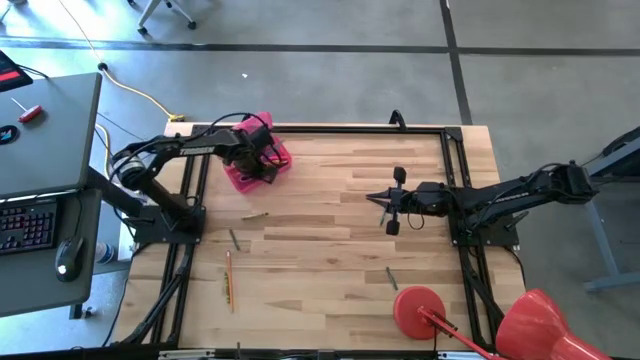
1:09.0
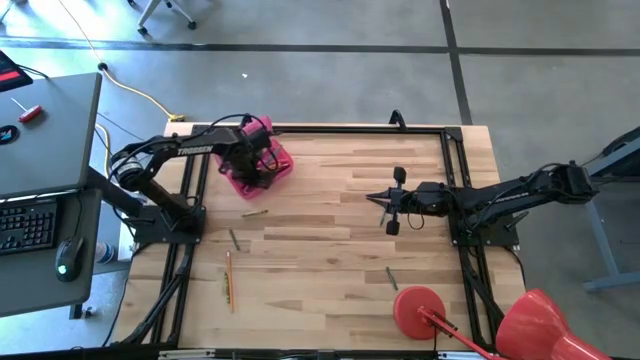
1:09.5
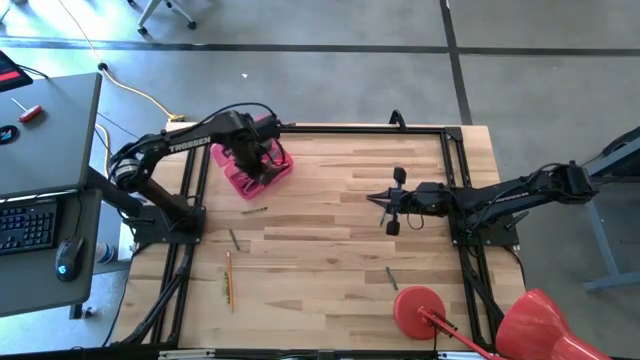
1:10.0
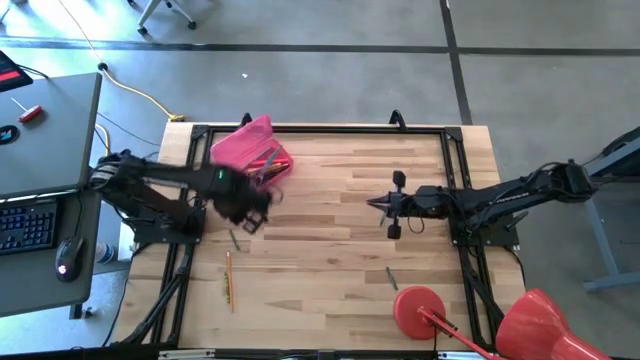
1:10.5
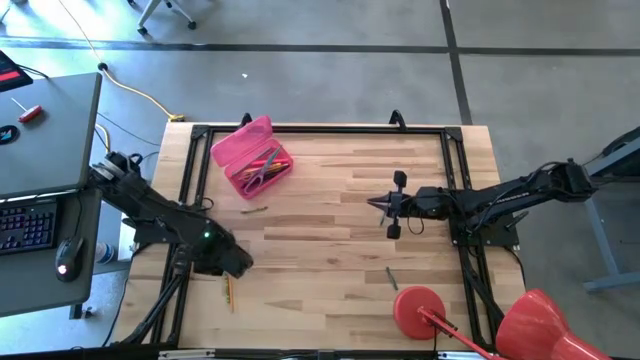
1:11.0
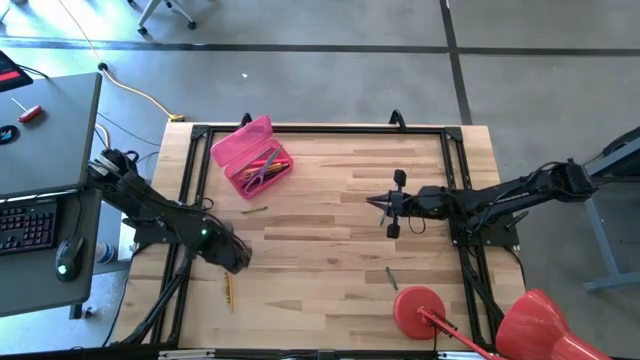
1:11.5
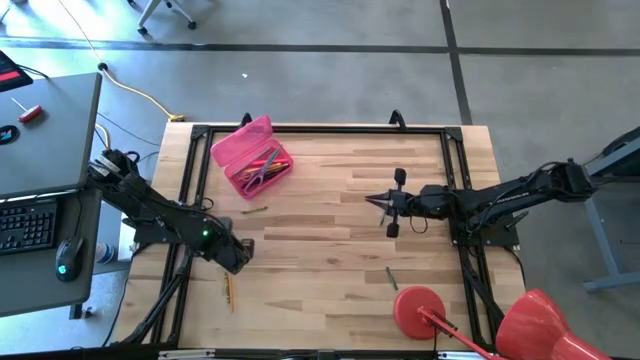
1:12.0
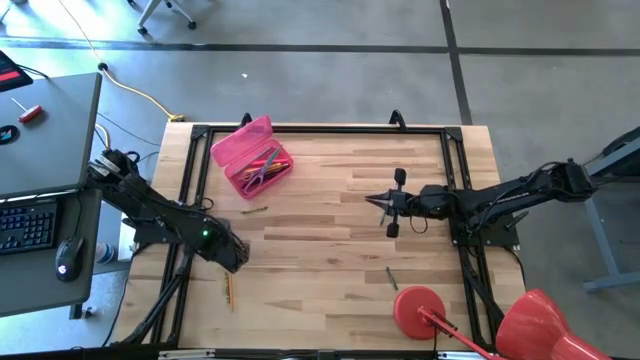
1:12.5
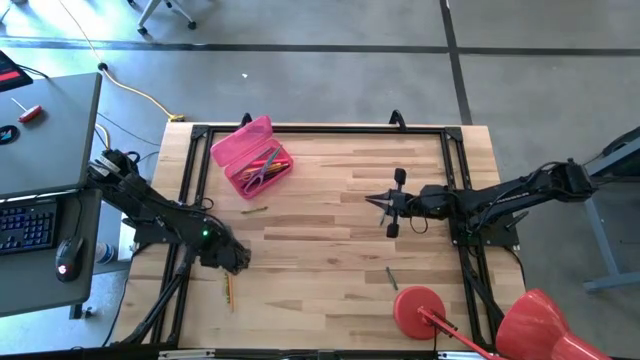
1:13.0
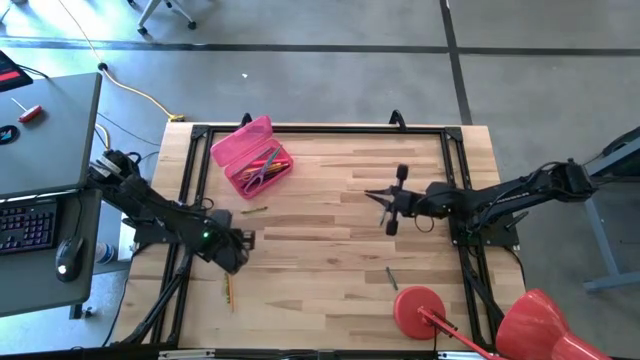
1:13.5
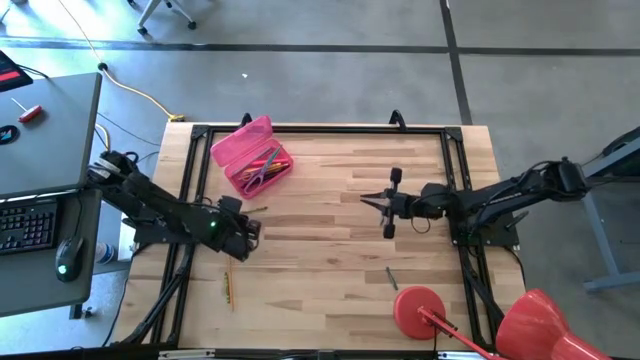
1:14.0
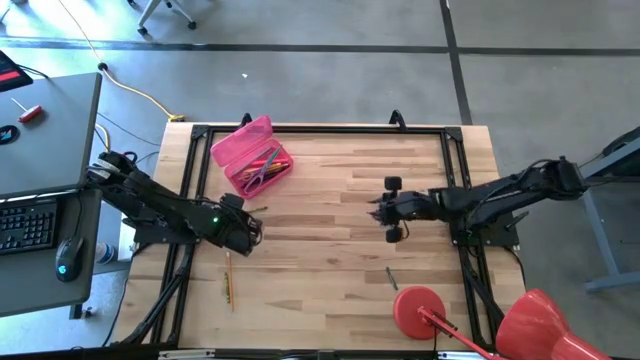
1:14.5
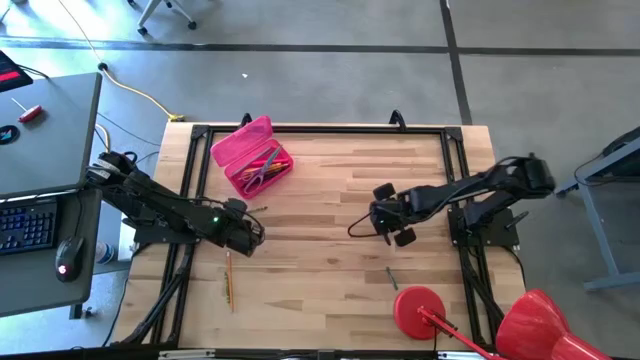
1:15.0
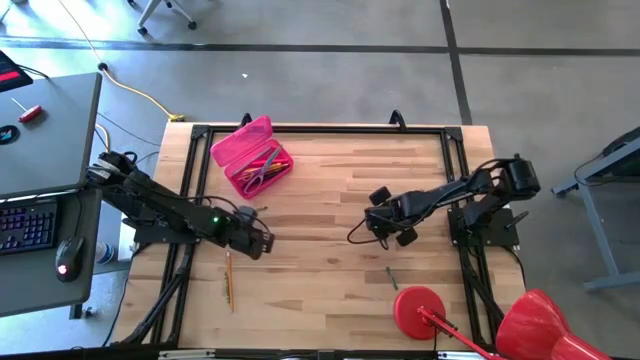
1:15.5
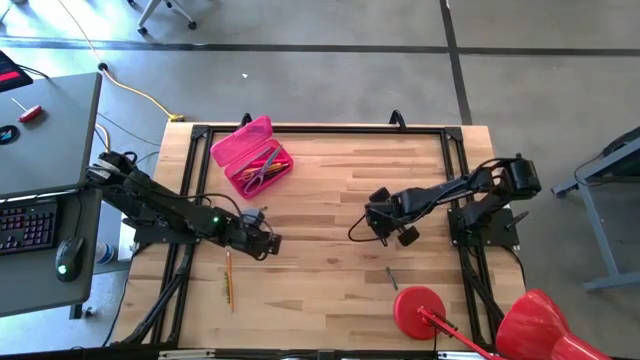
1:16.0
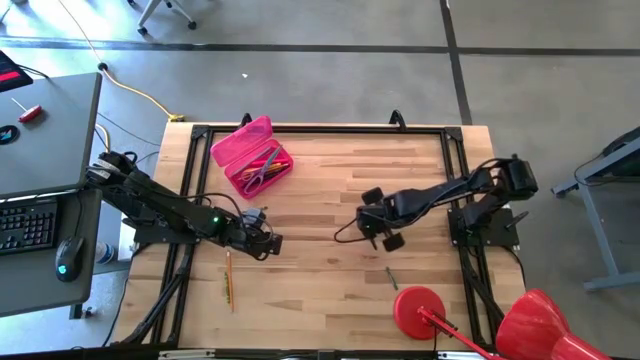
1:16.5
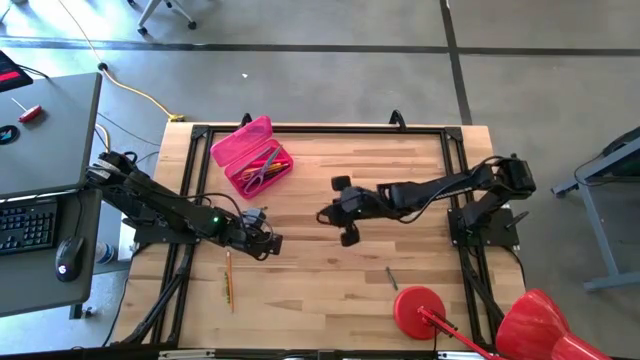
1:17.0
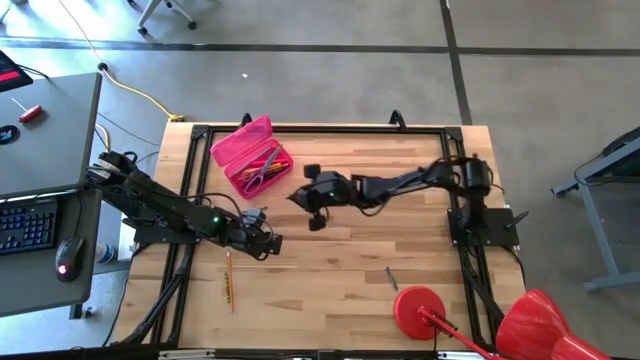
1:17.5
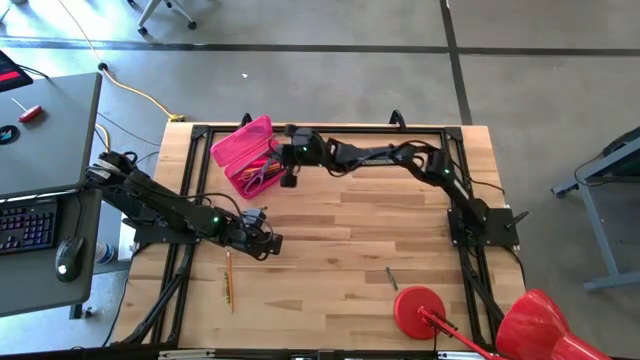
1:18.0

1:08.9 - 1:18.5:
Task: Pick & place school supplies into a supply box
Put the top green crayon into the supply box

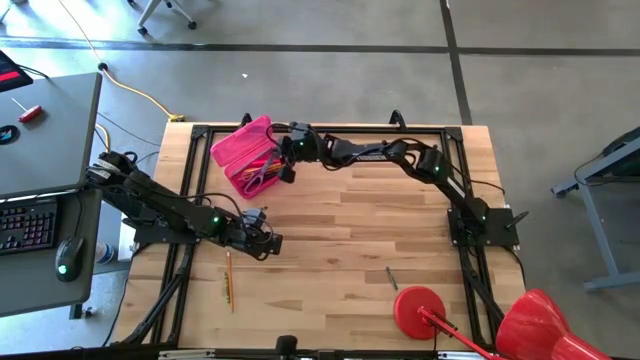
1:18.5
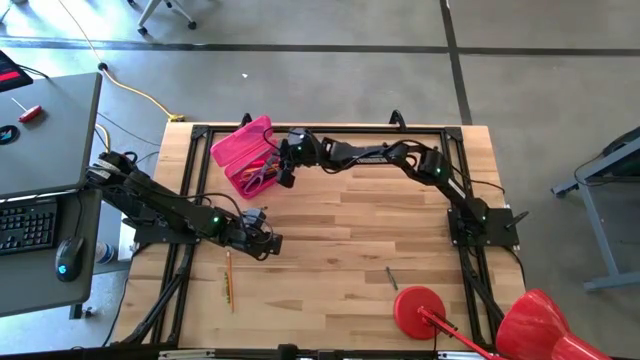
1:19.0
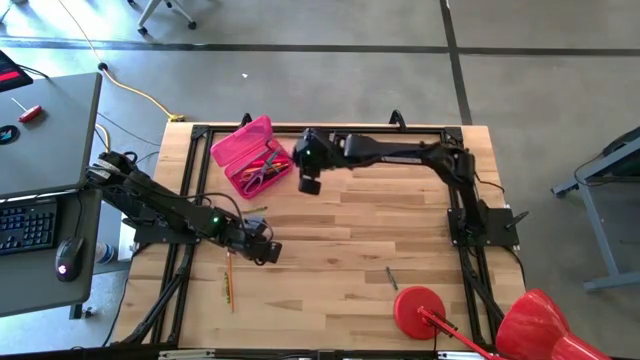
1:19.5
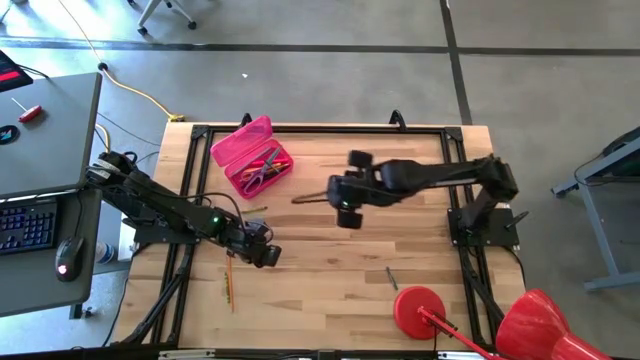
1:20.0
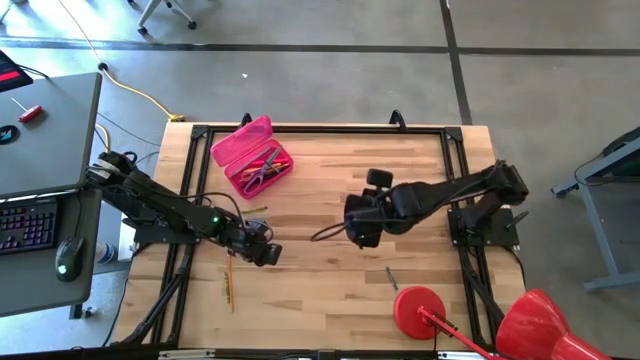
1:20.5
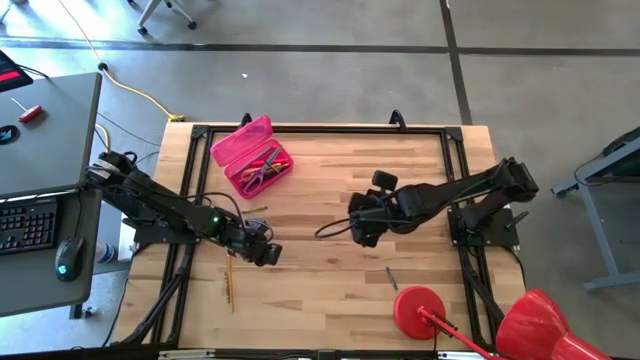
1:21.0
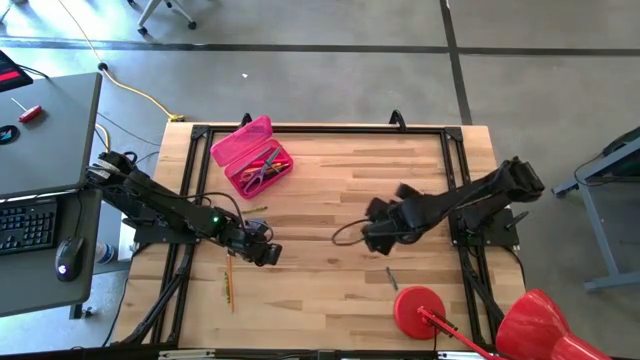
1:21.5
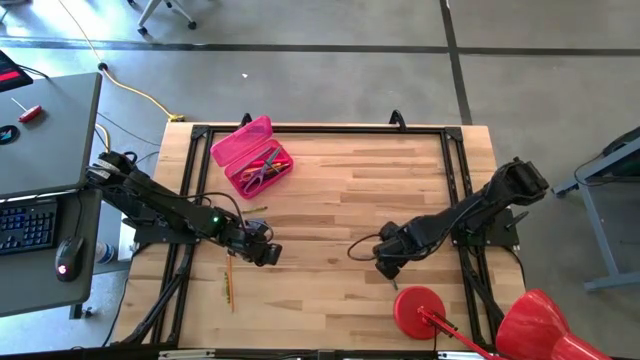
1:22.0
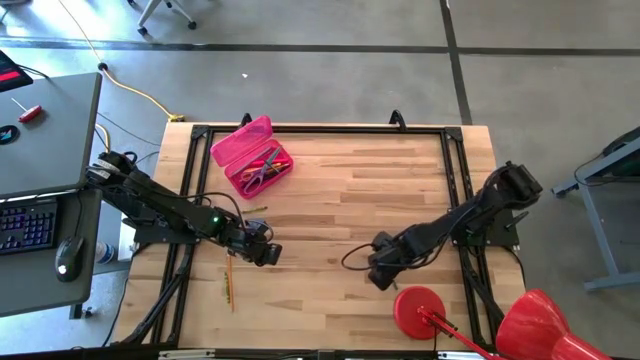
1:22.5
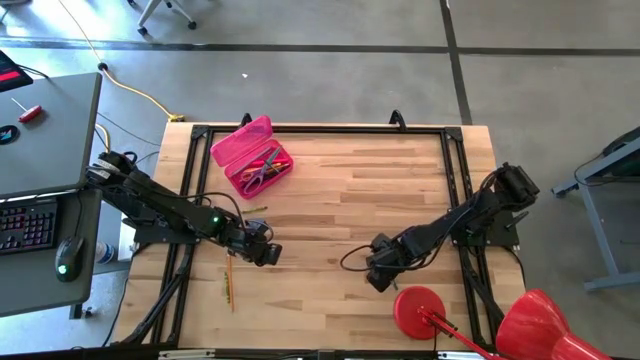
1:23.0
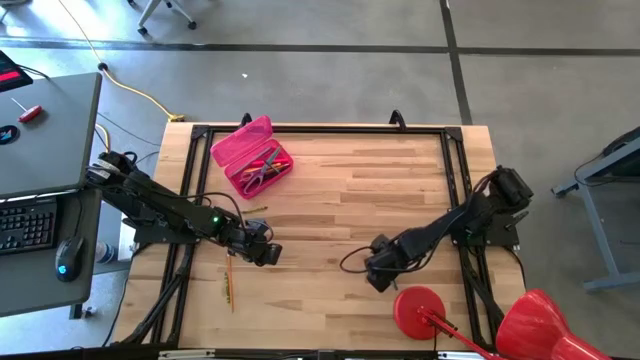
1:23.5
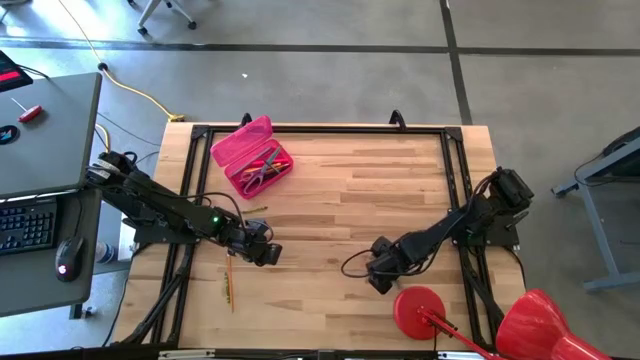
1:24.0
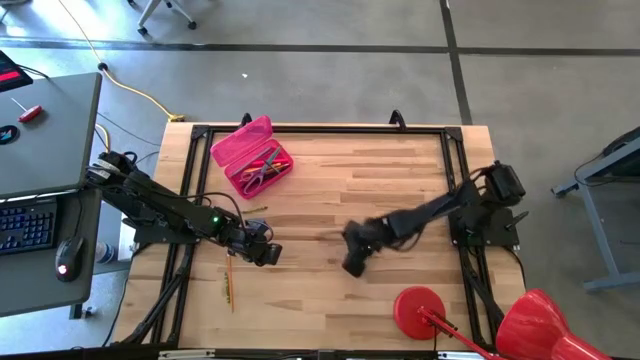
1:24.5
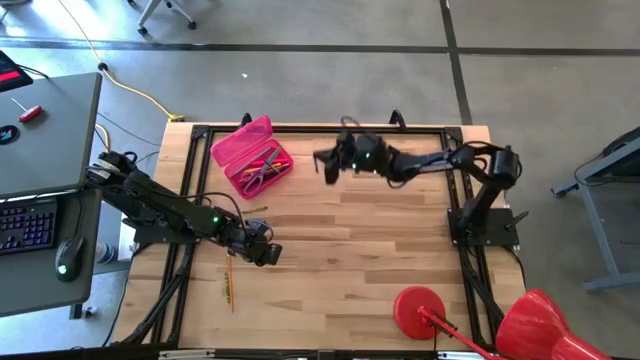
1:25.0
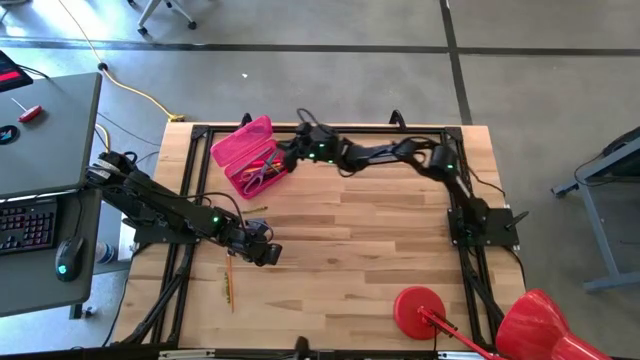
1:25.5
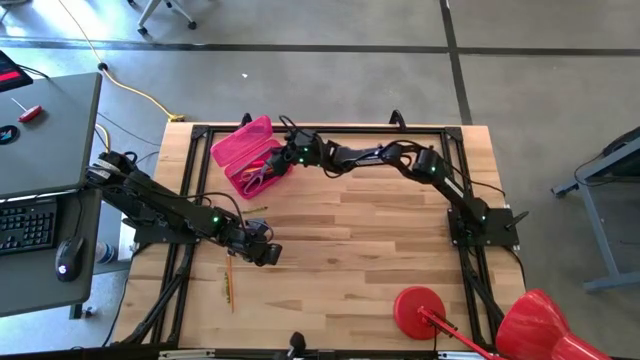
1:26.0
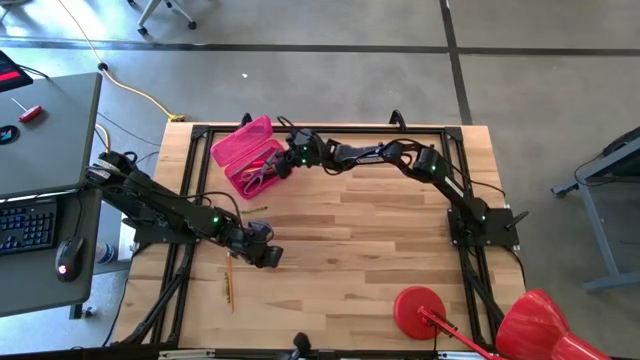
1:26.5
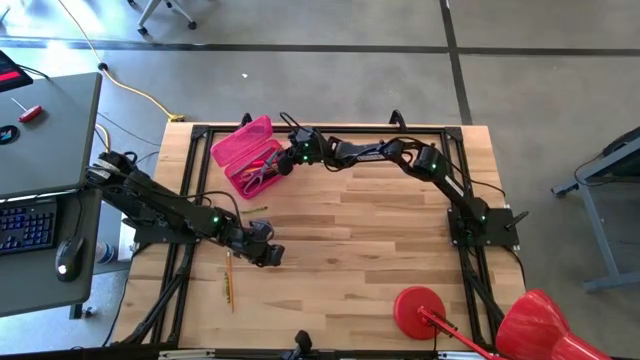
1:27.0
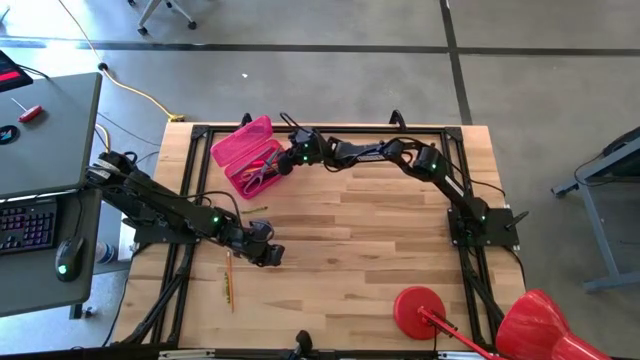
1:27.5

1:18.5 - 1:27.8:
Put the green crayon into the supply box

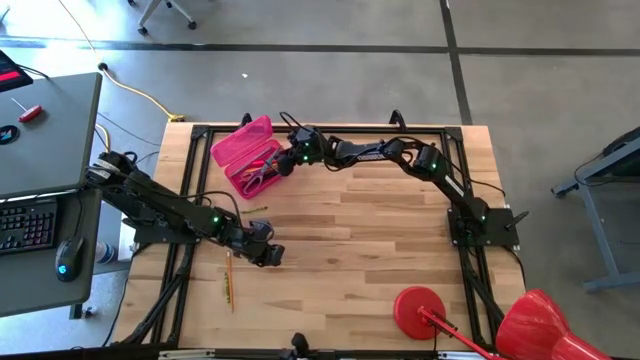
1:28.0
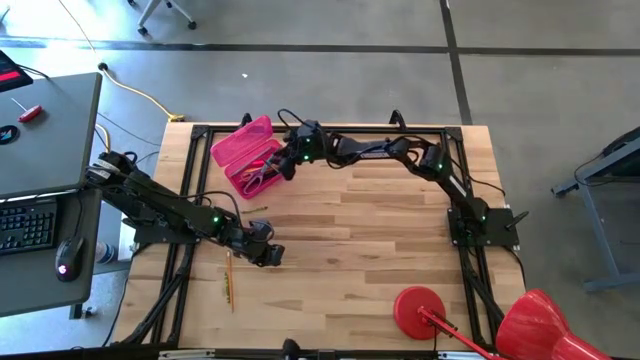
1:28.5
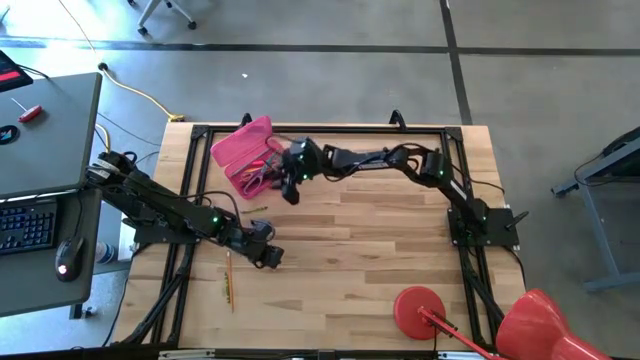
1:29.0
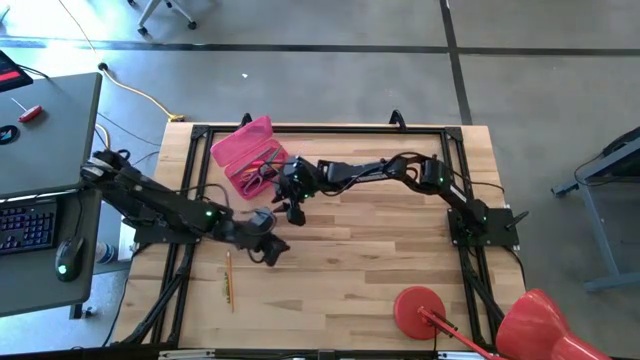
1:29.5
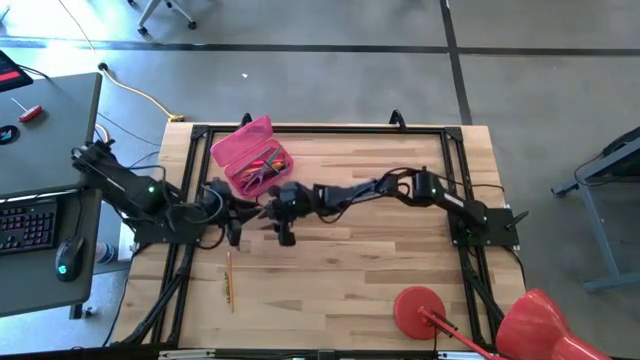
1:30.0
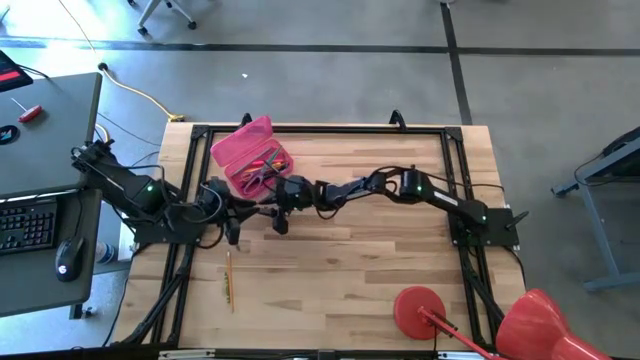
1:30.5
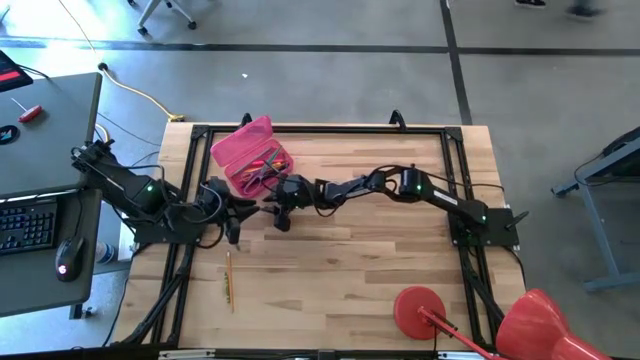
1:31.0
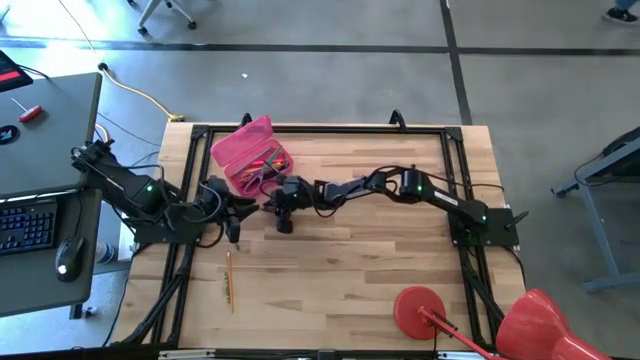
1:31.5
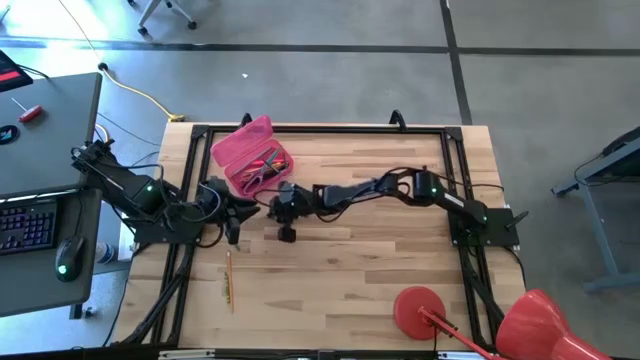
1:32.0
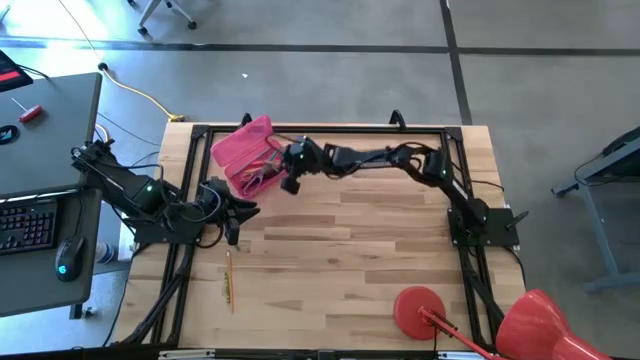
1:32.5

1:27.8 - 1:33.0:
Put the top yellow crayon into the supply box
